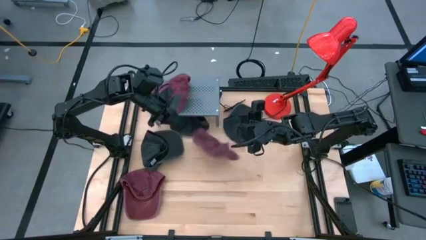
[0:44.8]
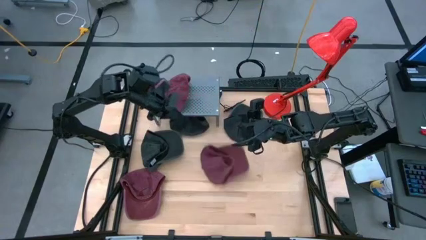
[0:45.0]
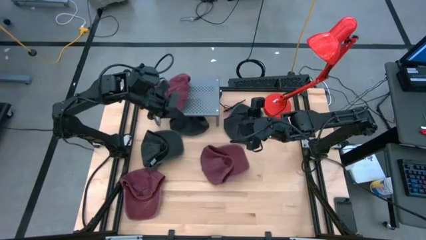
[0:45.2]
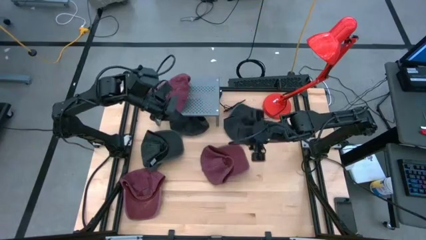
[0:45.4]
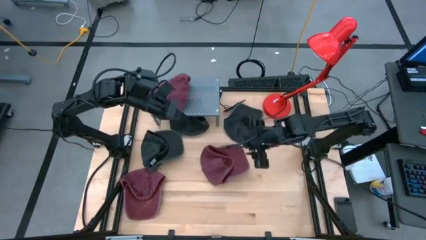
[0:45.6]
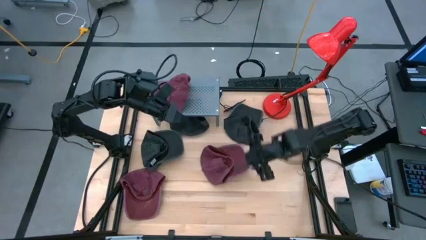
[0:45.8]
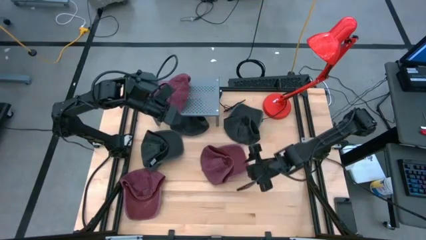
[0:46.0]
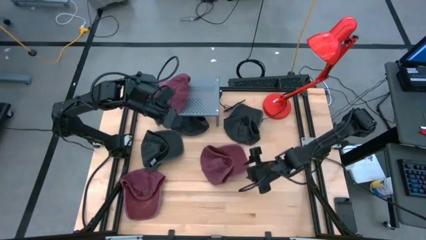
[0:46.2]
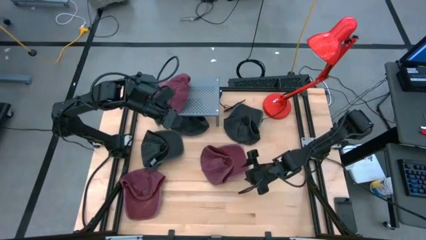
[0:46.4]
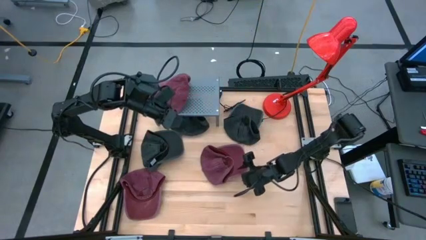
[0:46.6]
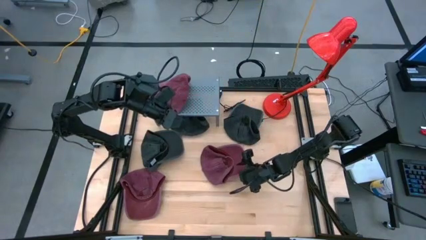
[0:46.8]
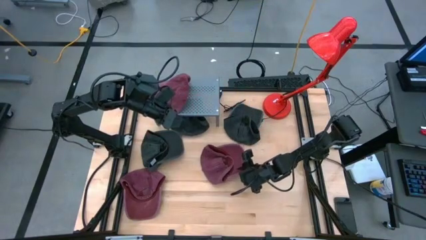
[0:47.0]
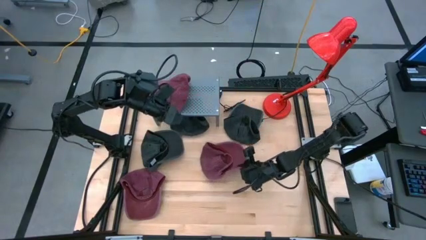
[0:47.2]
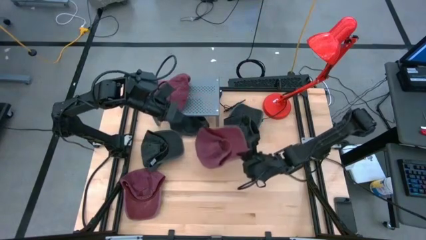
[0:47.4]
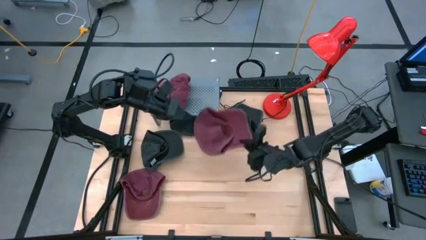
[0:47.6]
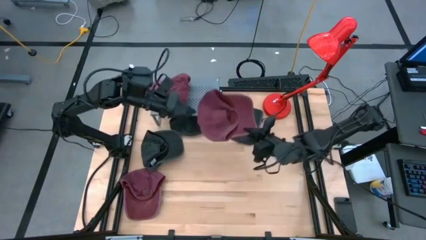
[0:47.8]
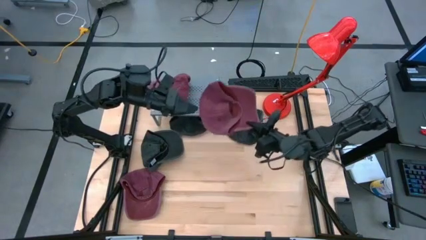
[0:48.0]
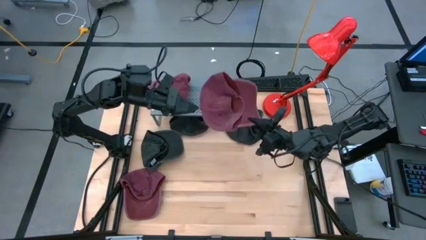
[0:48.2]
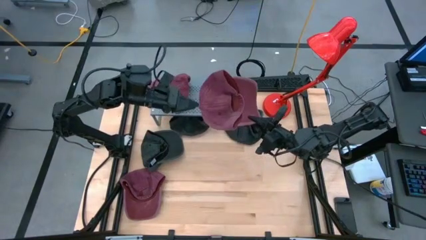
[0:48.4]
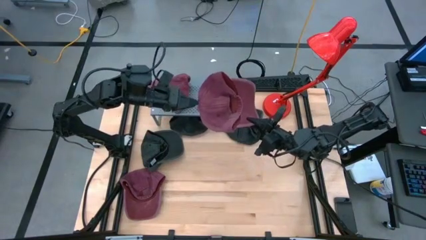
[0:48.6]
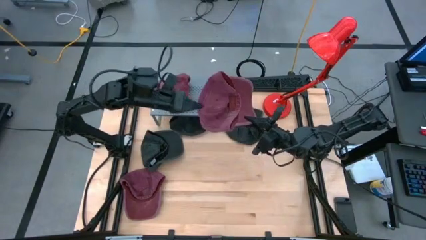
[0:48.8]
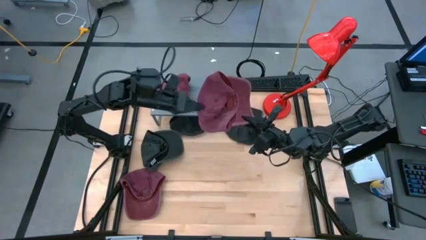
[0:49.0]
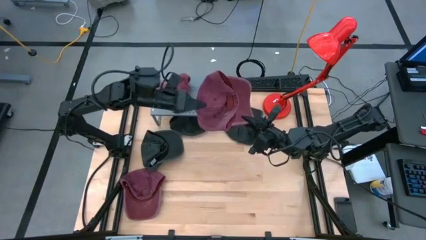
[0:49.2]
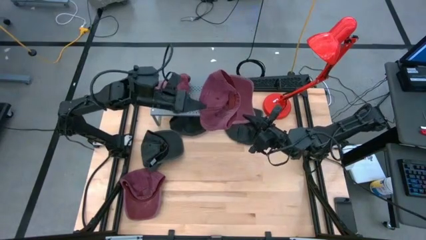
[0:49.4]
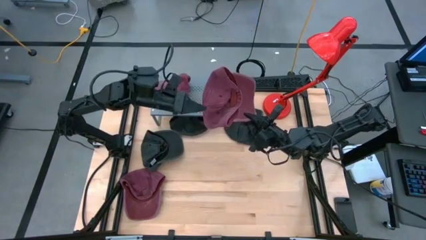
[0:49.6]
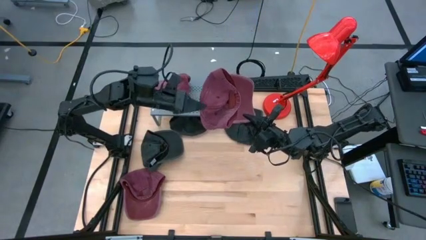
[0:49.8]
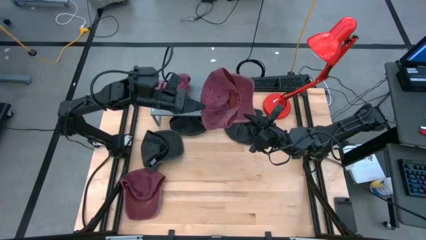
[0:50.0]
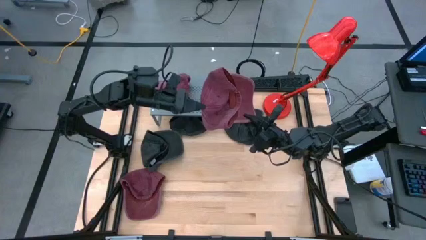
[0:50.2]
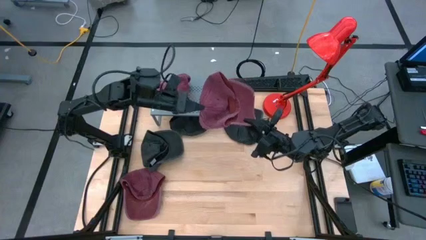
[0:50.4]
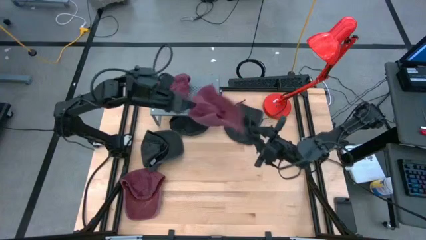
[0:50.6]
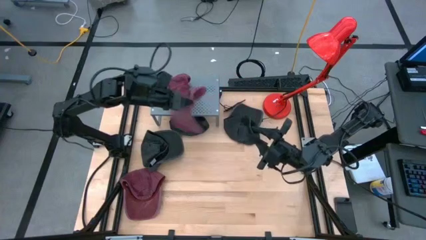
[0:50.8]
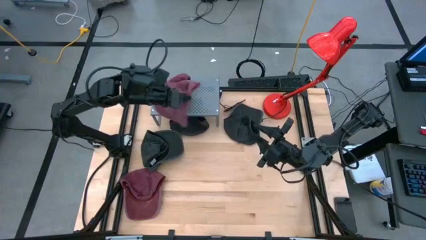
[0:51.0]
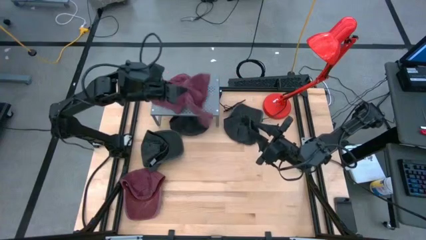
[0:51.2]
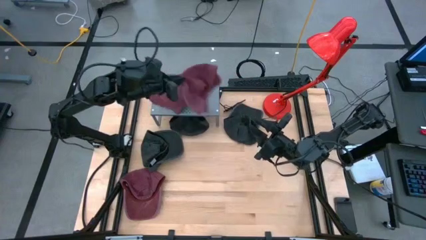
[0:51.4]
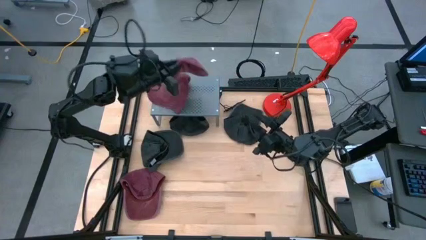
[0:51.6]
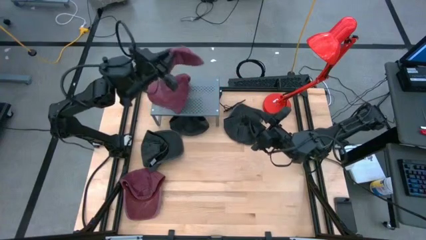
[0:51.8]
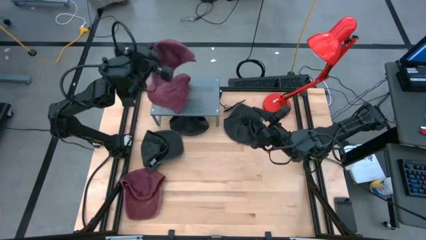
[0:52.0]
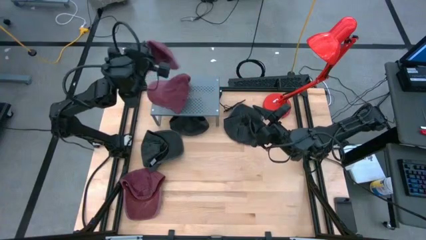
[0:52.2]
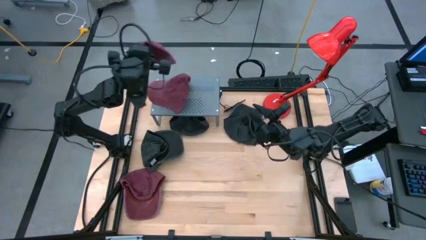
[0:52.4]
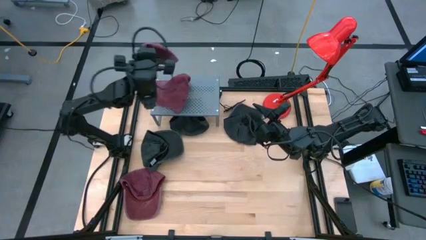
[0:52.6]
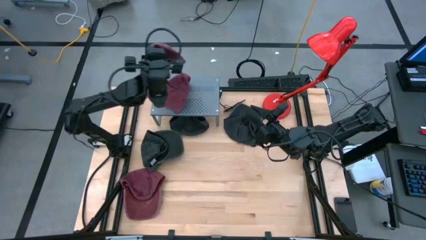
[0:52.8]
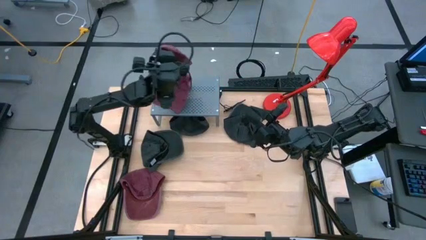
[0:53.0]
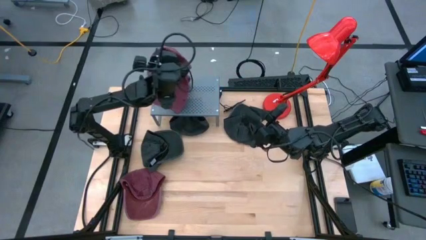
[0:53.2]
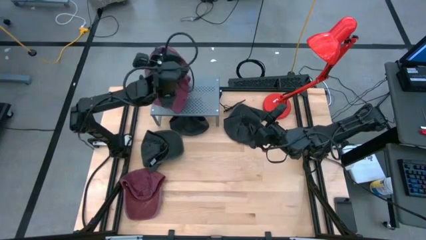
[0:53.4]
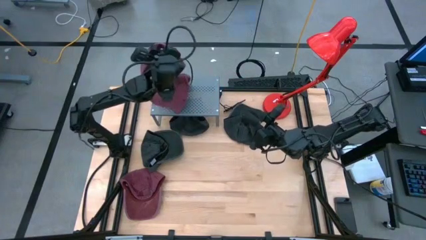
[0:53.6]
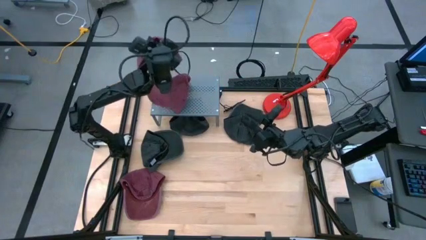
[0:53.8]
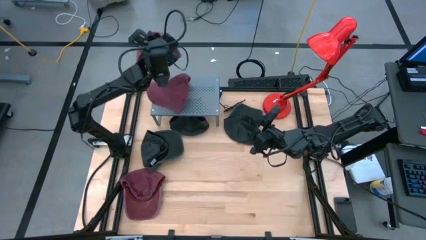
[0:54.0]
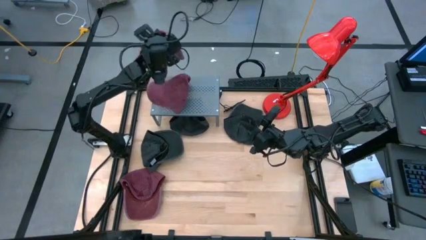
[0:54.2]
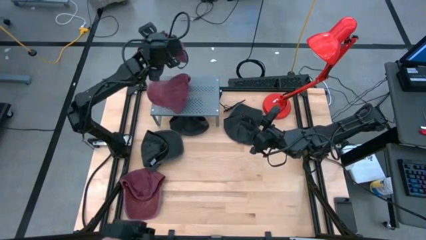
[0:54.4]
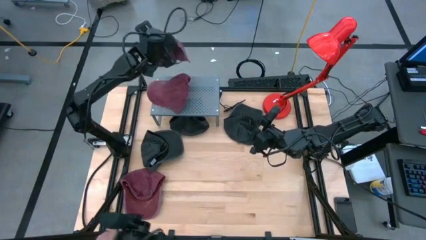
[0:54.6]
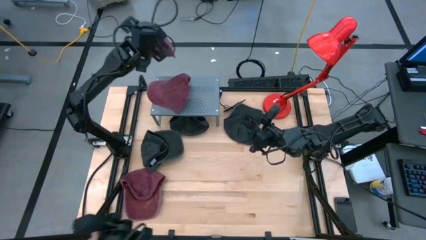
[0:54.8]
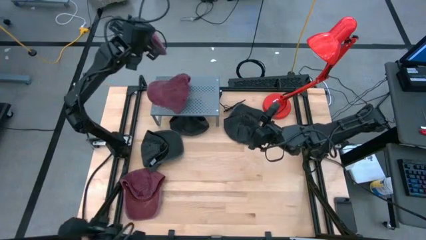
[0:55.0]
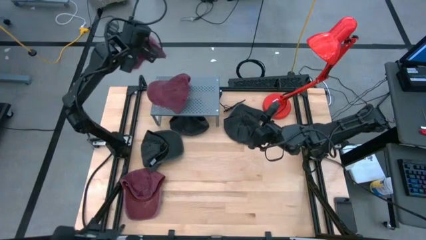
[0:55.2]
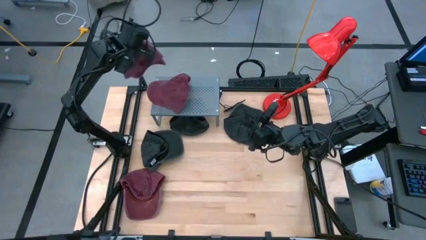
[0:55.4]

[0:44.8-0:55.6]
Task: Pick & Place hat
Stack the top red cap on top of the red cap on the shelf

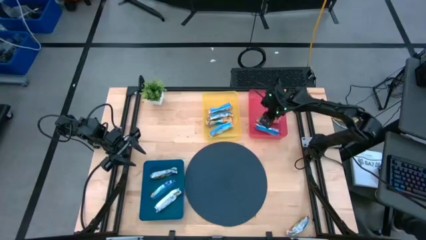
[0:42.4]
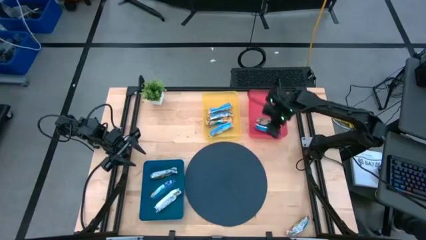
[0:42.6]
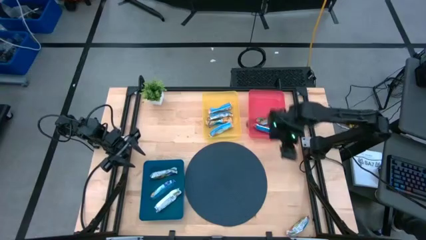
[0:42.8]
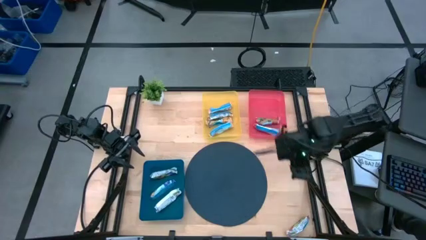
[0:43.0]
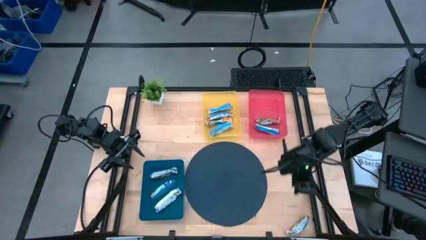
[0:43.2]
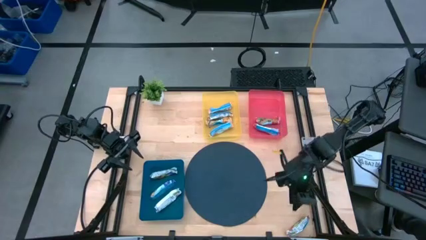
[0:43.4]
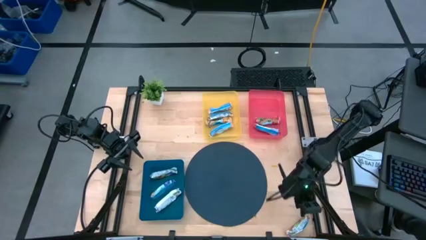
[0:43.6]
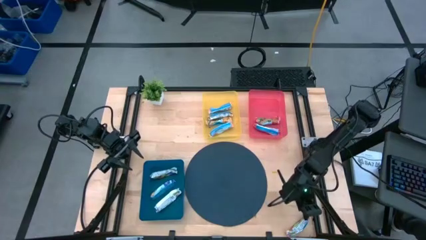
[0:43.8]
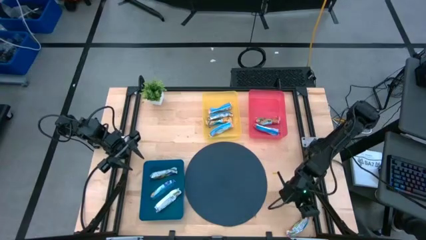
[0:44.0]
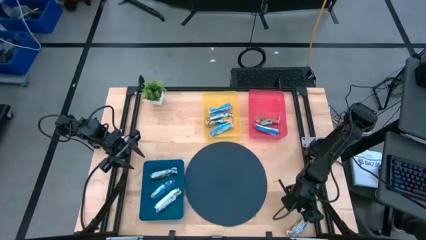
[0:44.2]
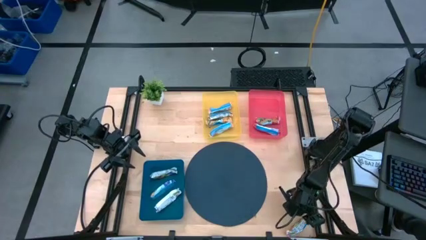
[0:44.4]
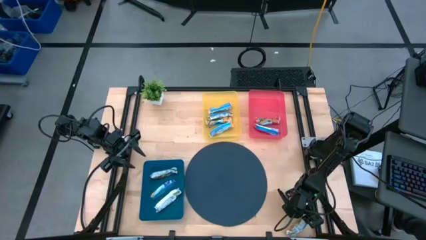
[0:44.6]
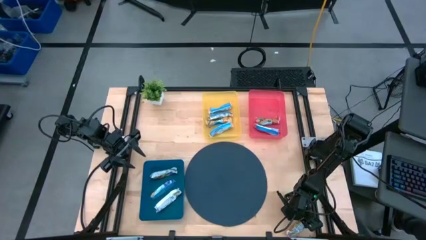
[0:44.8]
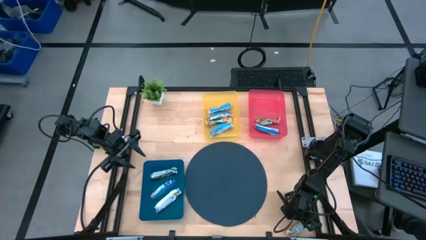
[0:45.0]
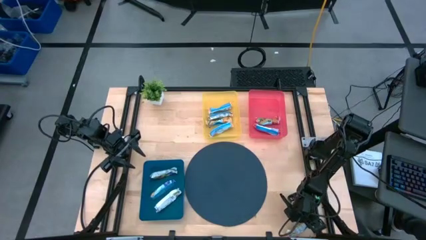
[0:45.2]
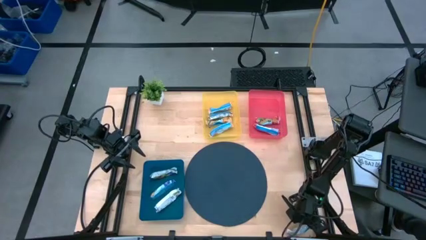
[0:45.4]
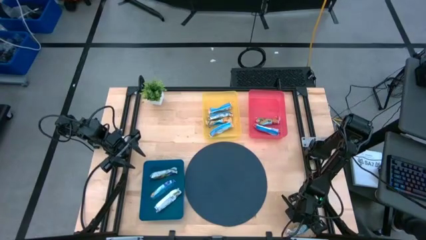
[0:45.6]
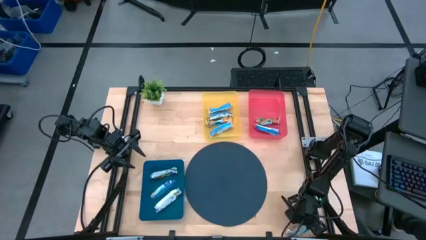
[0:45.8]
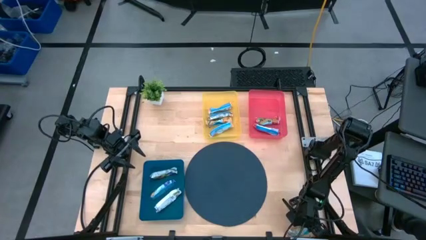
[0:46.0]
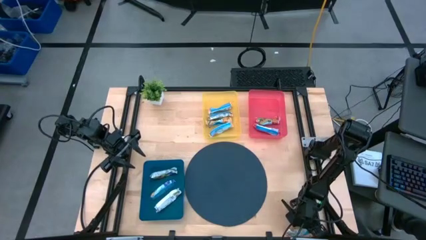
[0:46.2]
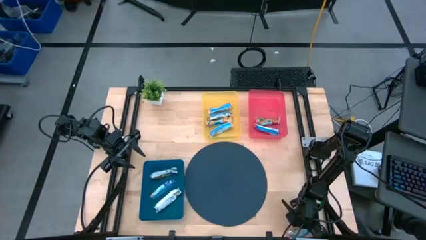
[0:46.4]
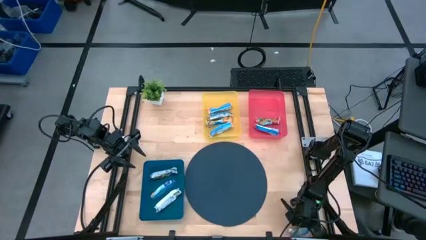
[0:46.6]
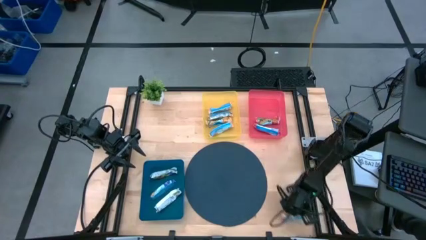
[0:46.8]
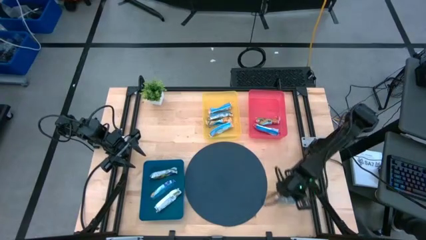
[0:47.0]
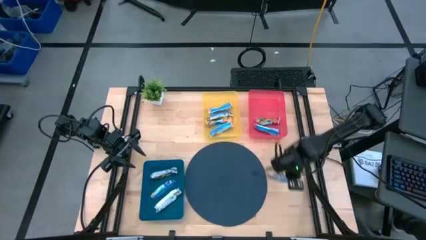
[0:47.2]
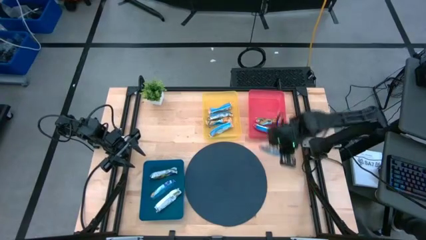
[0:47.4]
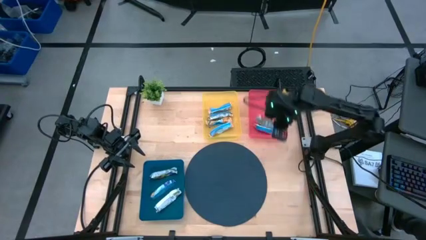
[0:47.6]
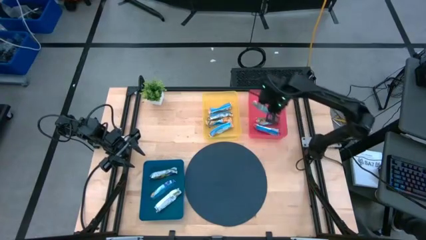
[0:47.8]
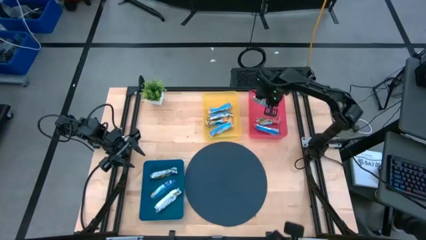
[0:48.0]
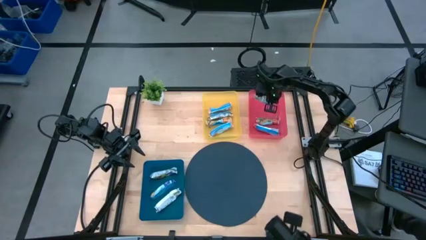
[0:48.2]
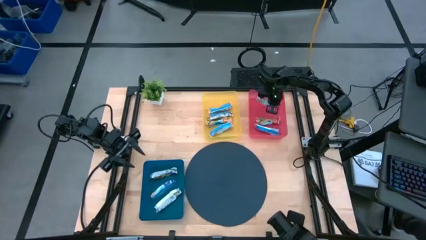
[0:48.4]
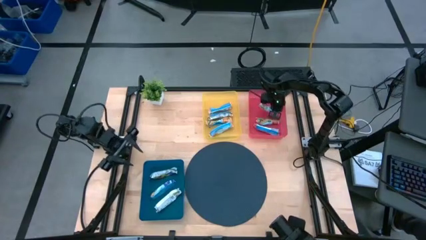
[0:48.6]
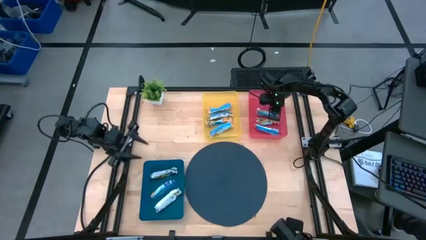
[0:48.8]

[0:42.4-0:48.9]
Task: Pick and place Granola Bars by type
Put the red granola bar into the red bin
